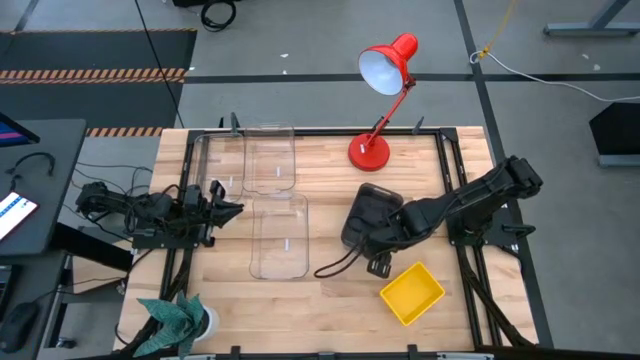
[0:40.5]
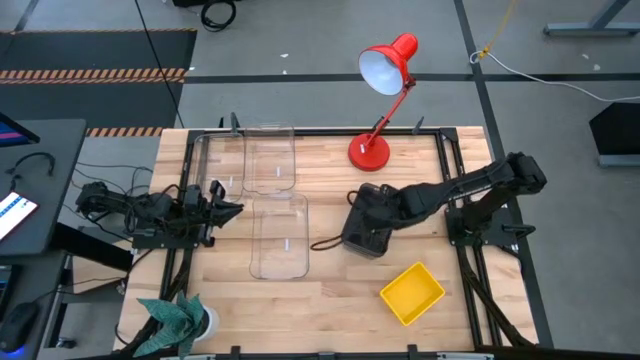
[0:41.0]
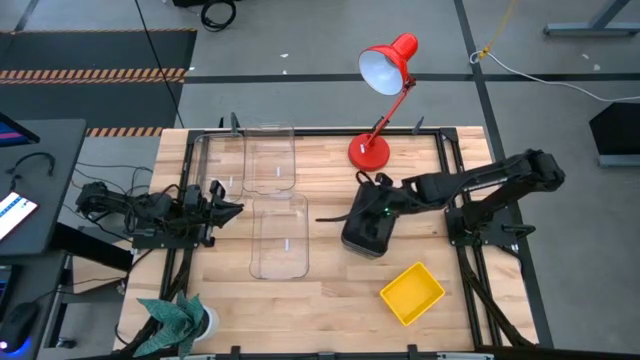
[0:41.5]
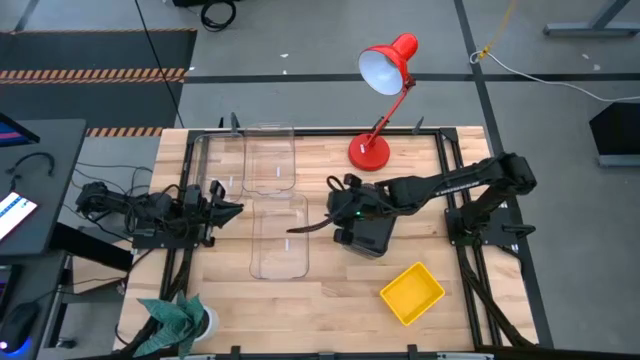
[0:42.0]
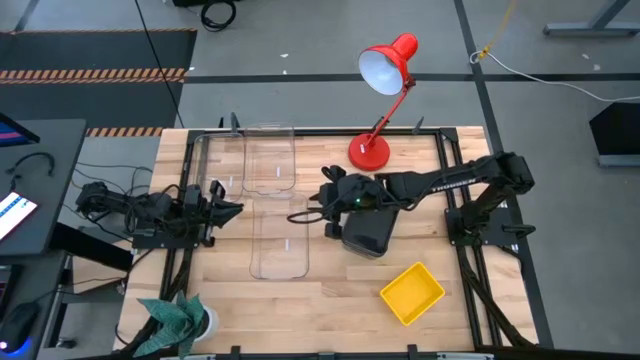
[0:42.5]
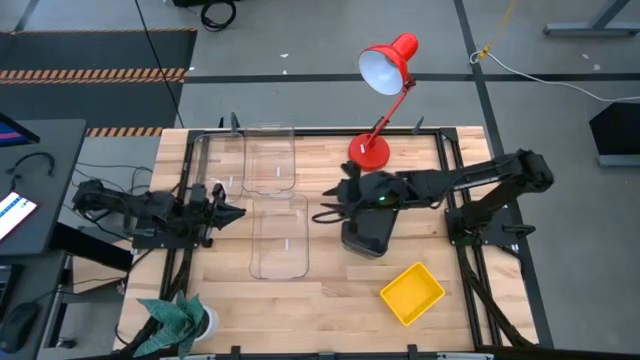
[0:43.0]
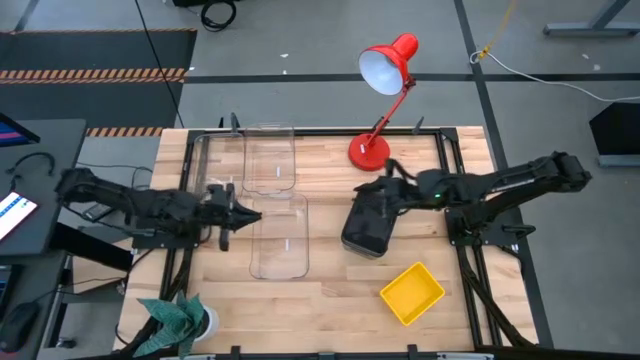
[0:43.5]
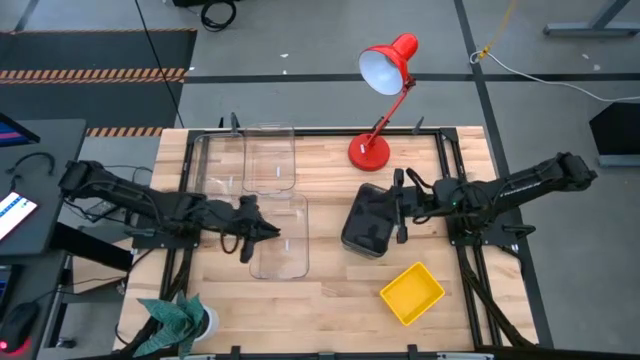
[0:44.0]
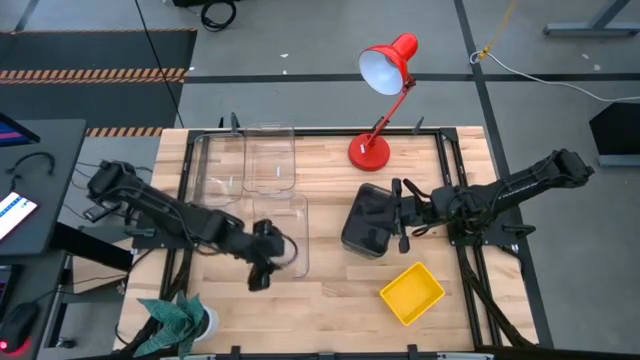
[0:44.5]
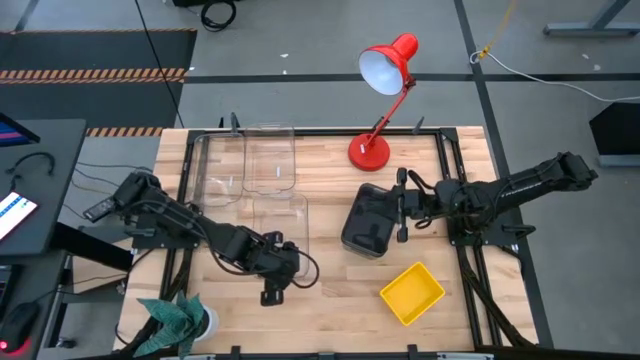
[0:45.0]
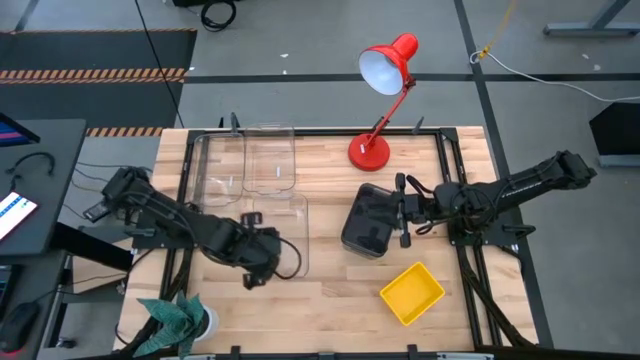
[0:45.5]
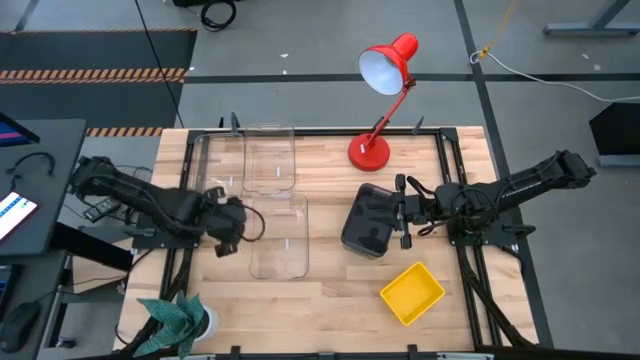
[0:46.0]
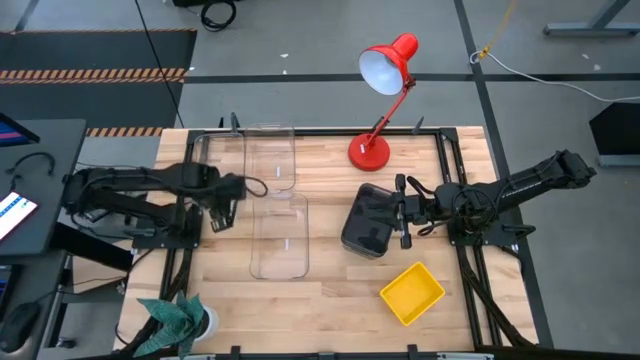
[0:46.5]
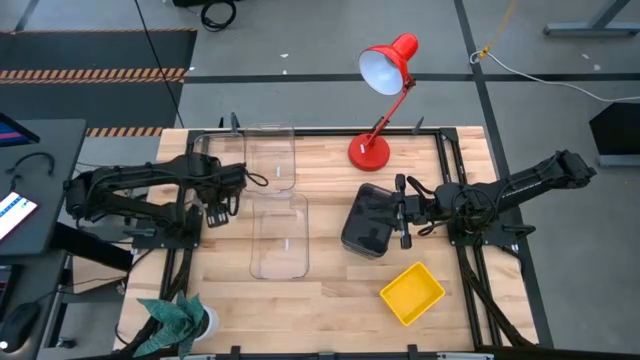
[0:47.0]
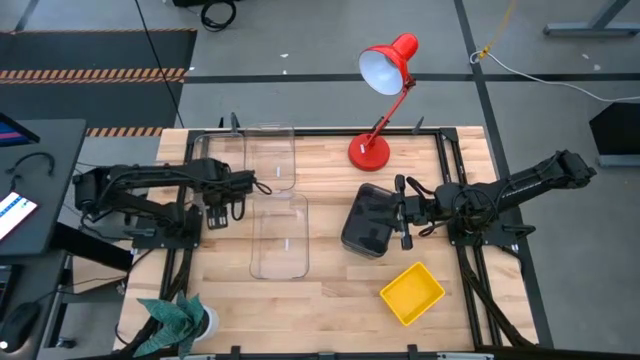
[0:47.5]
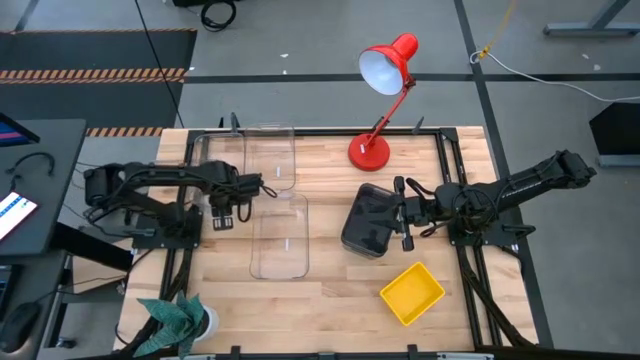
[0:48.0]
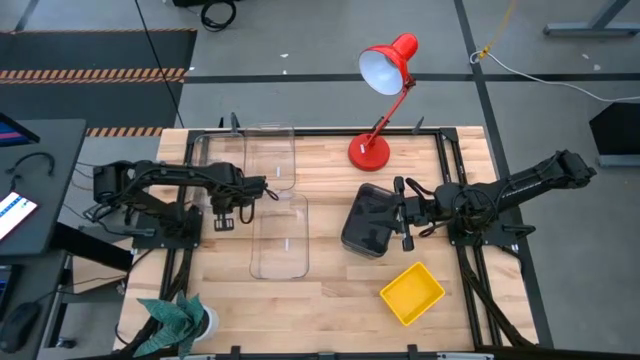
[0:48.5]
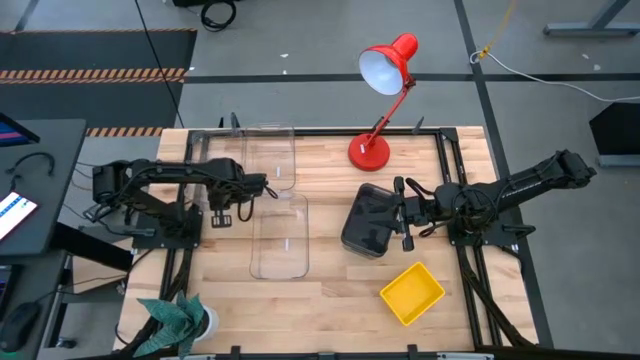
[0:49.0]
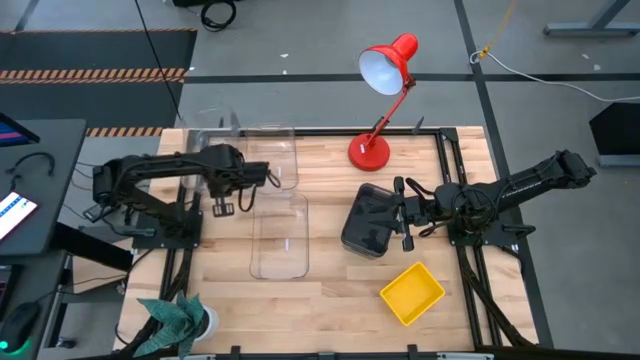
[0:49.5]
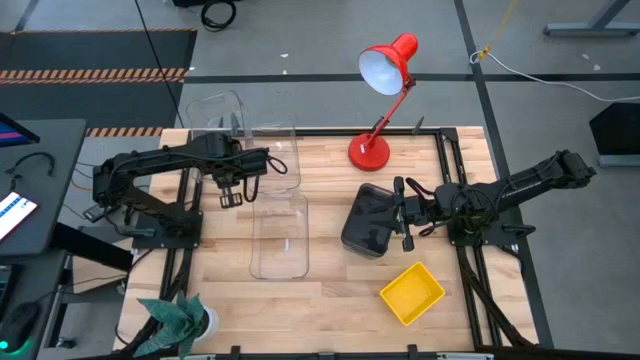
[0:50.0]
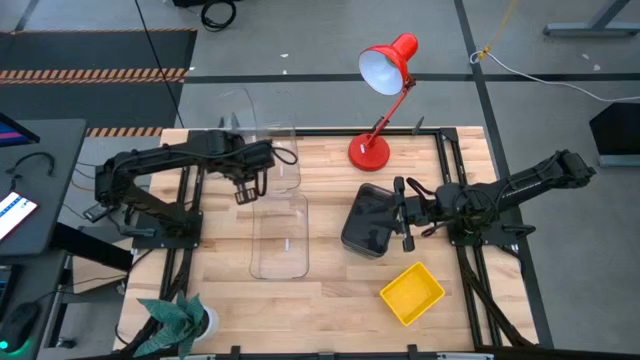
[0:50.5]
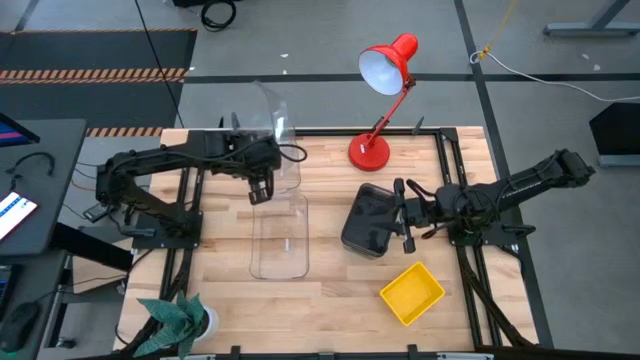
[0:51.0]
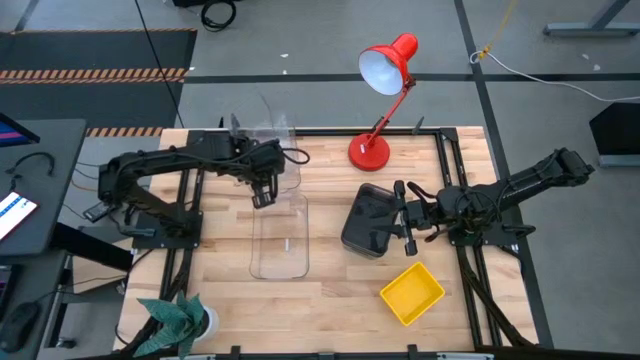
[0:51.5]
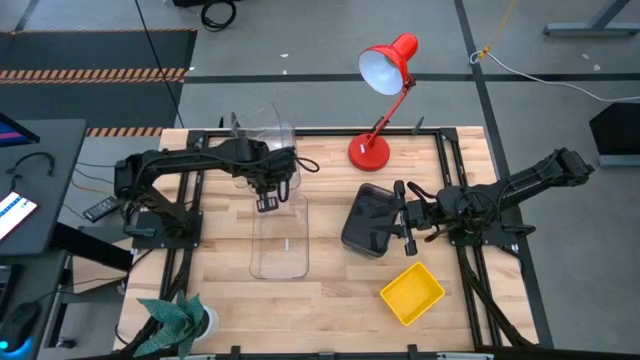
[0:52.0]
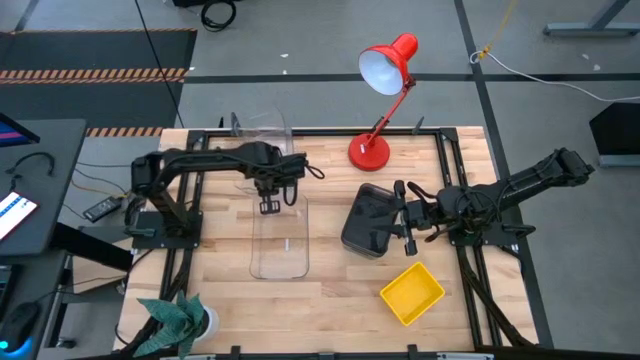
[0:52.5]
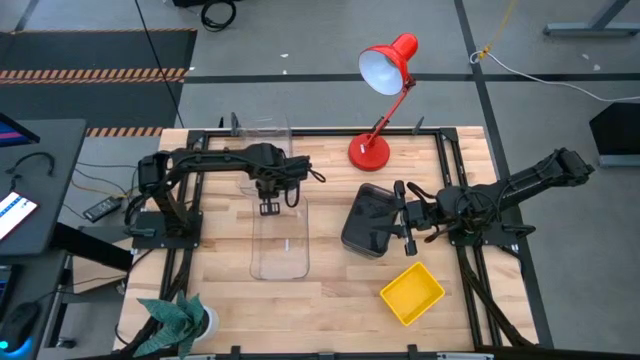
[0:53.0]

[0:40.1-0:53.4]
Stack the top left transparent bin on top of the top right transparent bin

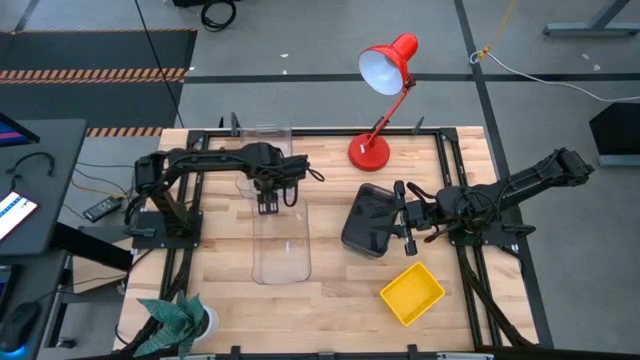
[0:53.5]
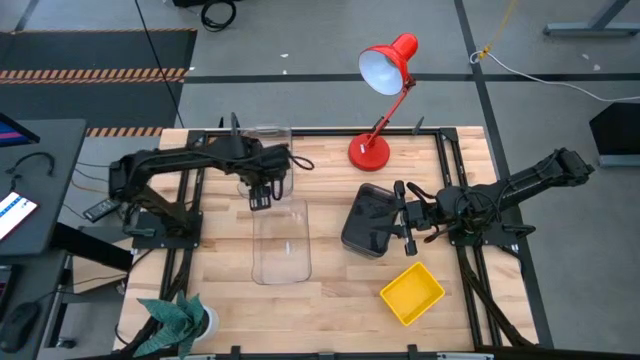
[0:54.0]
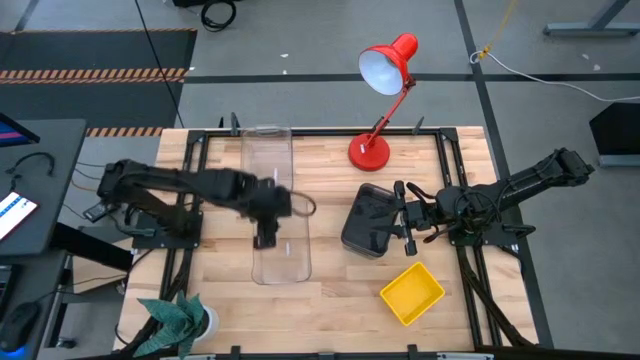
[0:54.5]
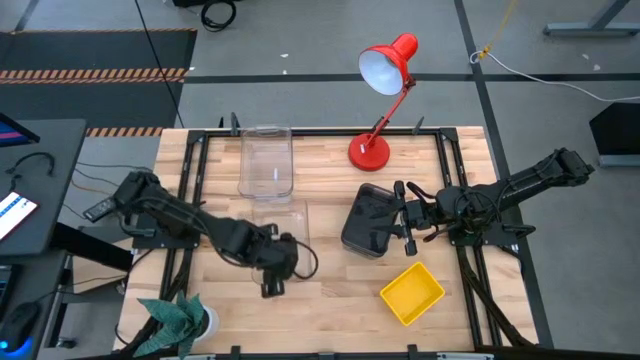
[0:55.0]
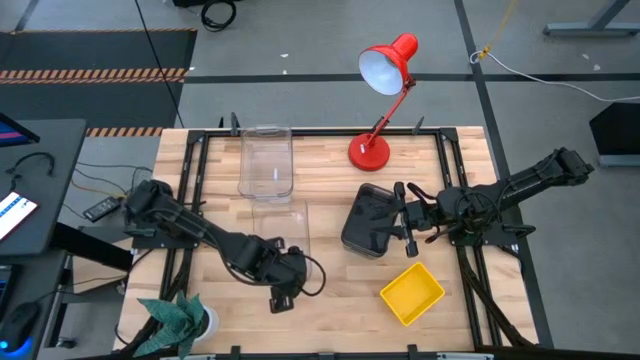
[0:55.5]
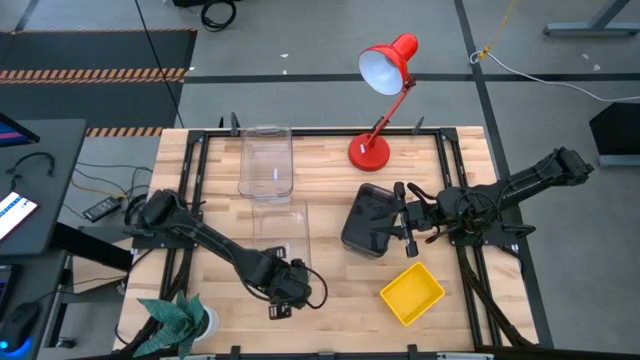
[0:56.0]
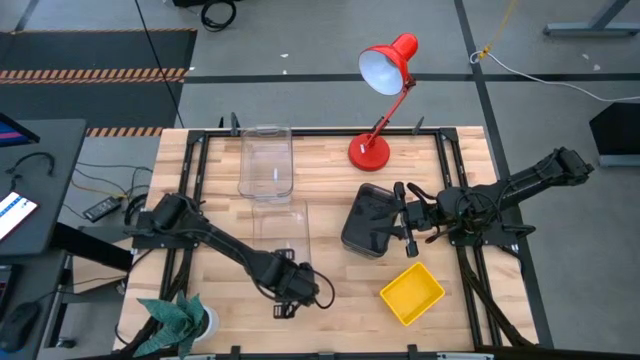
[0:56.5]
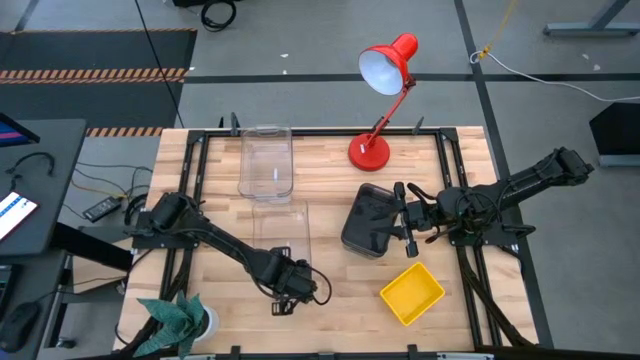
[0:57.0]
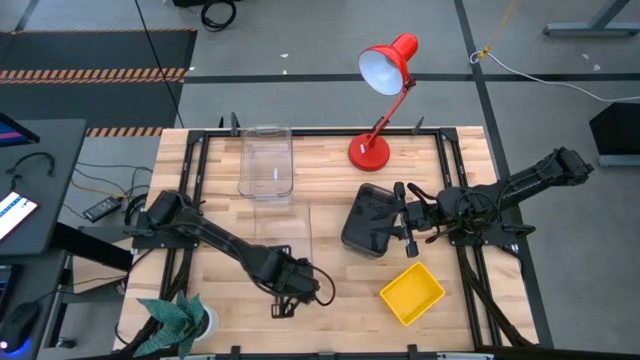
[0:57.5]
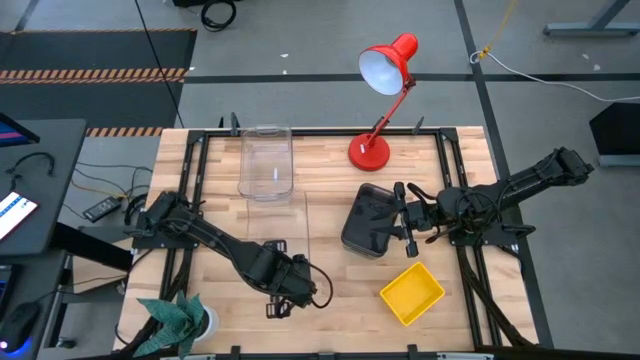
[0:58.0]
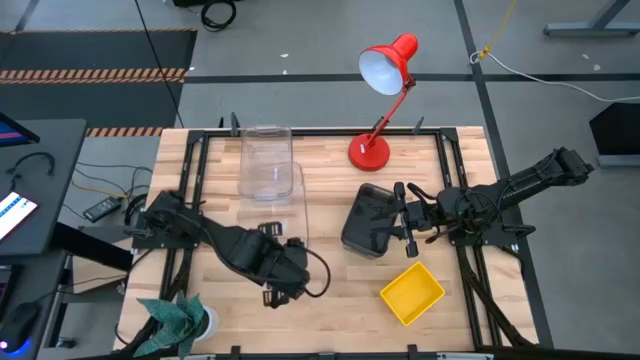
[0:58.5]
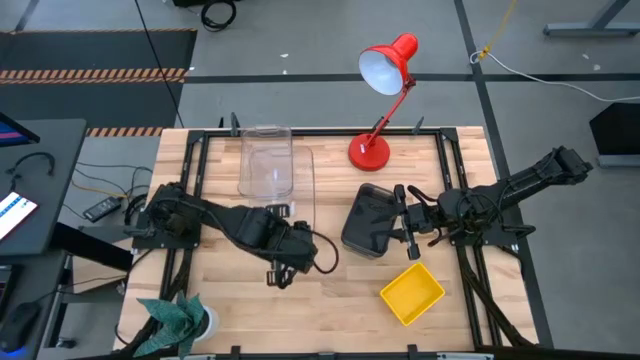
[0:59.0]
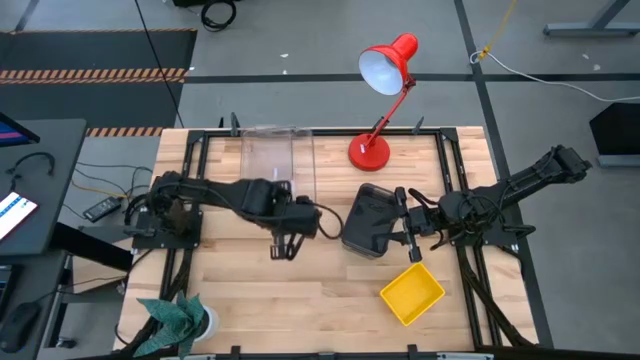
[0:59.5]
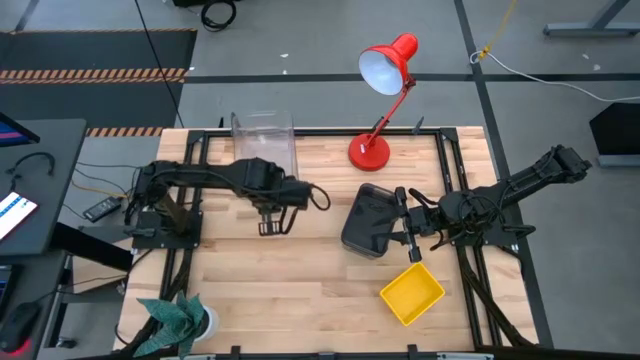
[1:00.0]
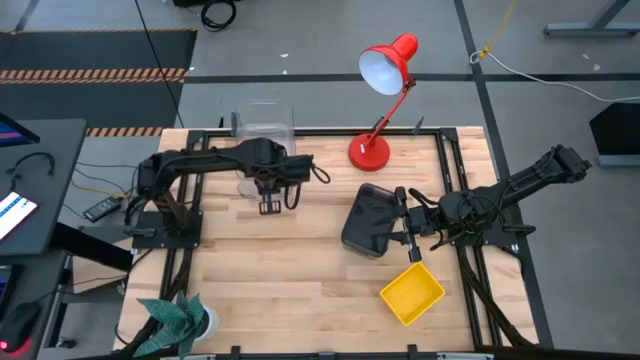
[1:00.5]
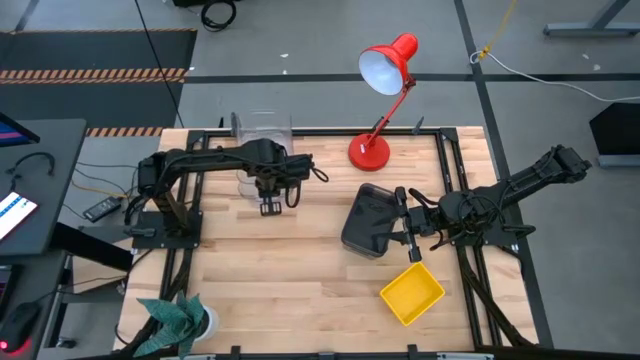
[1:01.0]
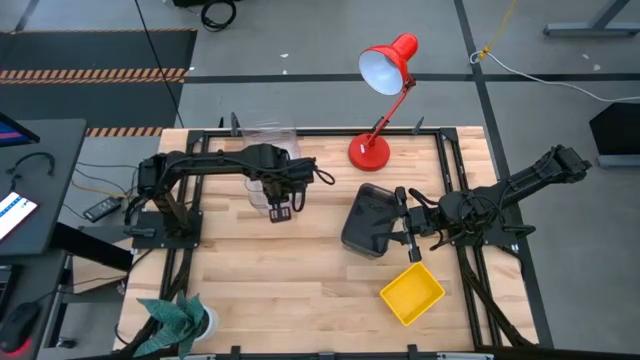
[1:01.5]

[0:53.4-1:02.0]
Stack the bottom transparent bin on top of the top transparent bins
